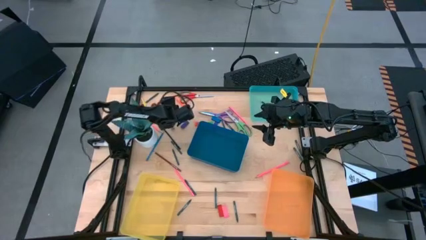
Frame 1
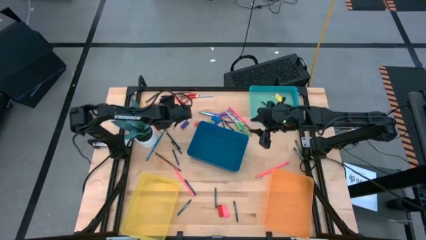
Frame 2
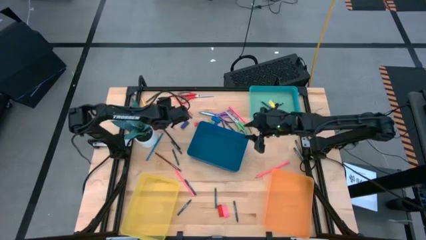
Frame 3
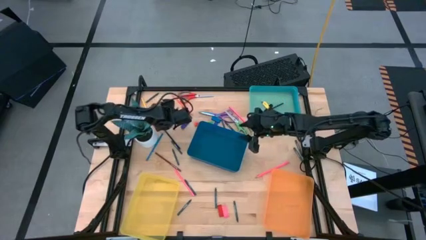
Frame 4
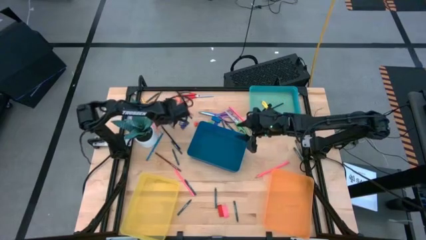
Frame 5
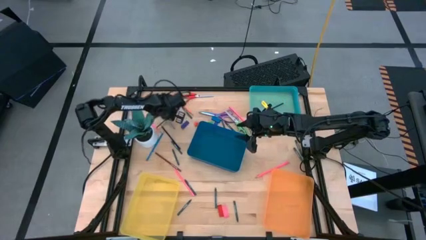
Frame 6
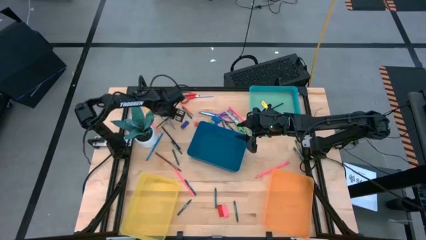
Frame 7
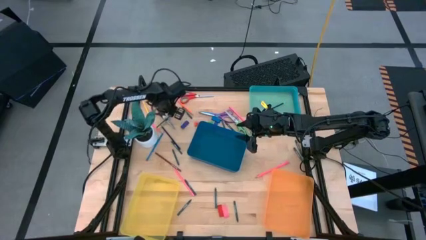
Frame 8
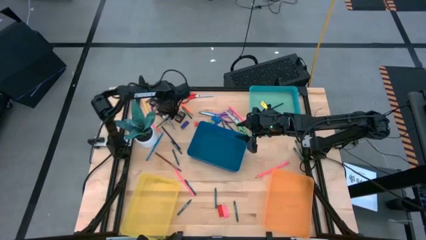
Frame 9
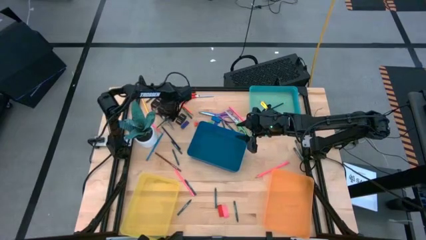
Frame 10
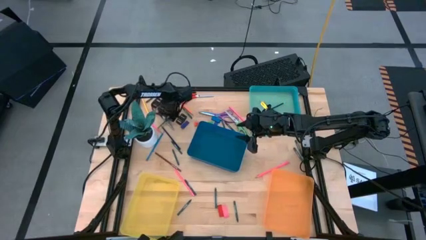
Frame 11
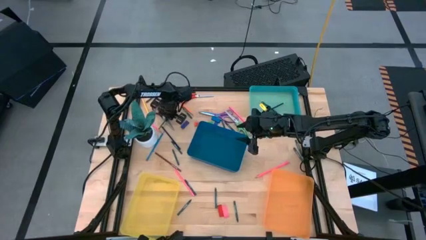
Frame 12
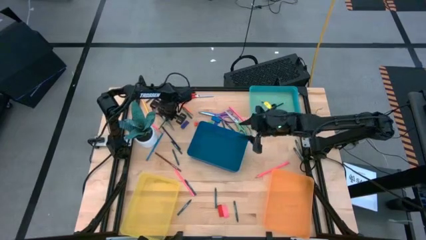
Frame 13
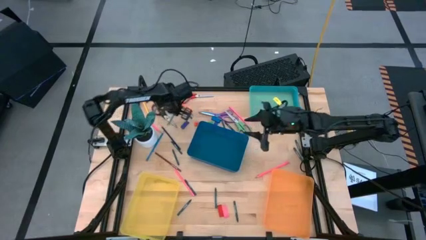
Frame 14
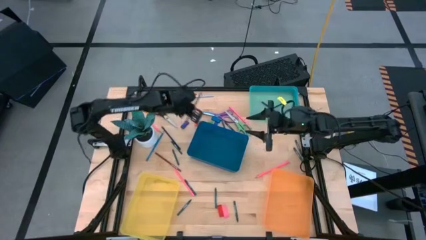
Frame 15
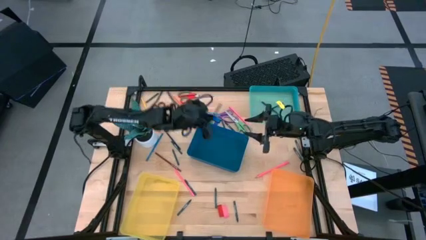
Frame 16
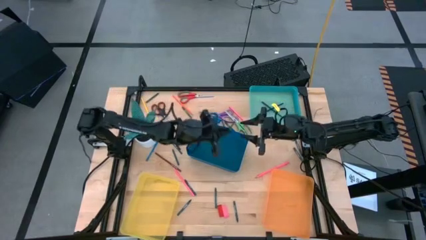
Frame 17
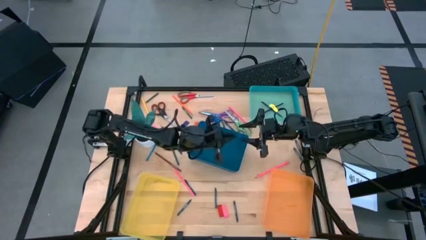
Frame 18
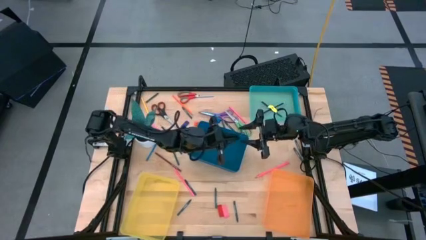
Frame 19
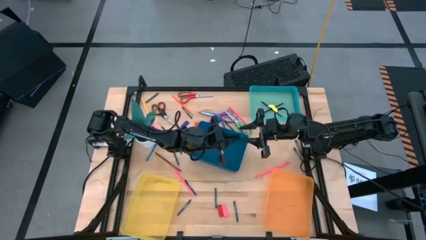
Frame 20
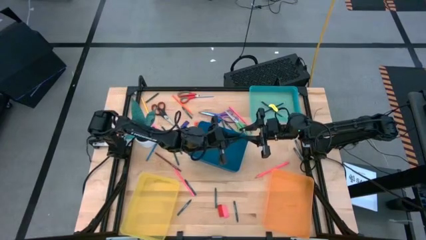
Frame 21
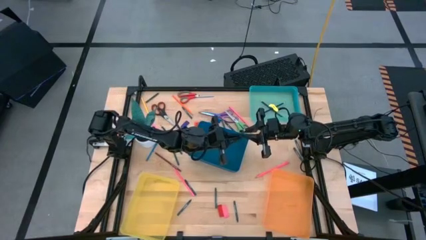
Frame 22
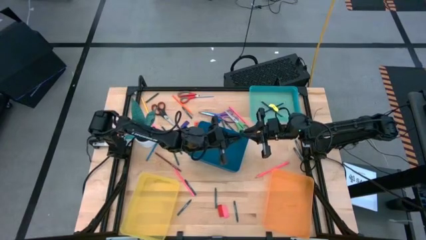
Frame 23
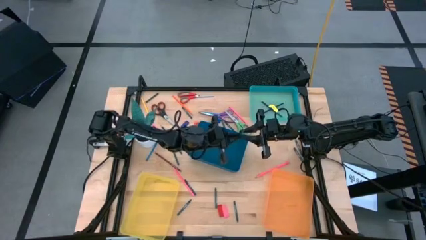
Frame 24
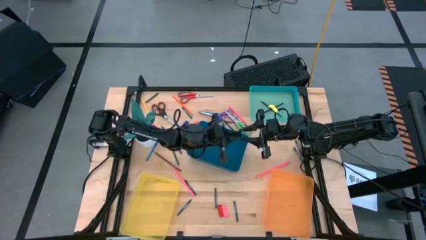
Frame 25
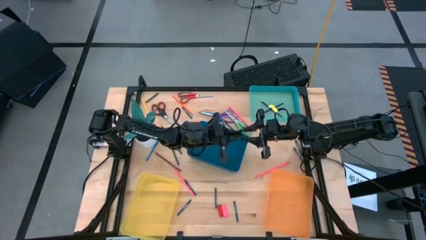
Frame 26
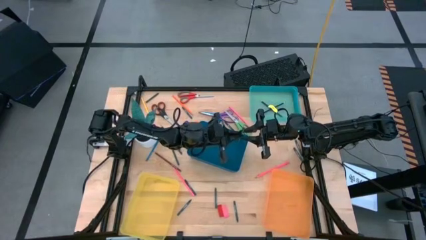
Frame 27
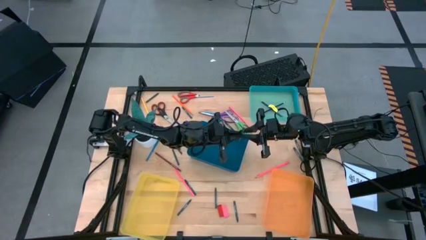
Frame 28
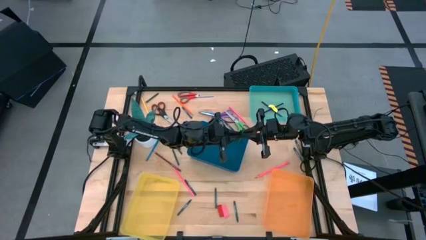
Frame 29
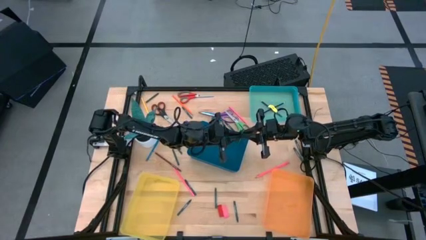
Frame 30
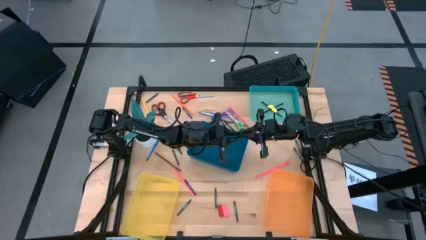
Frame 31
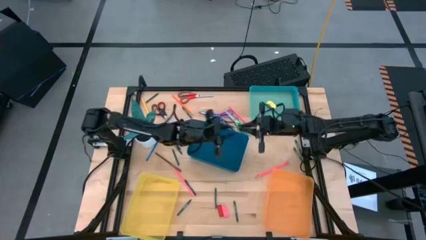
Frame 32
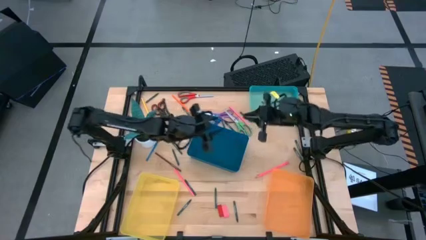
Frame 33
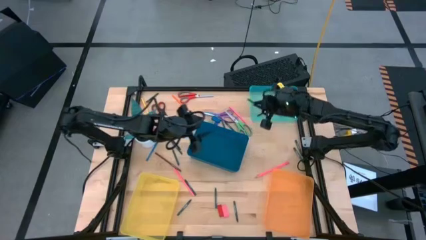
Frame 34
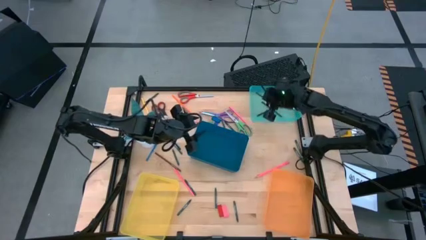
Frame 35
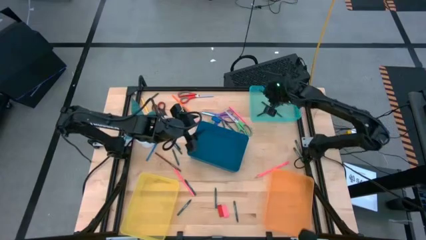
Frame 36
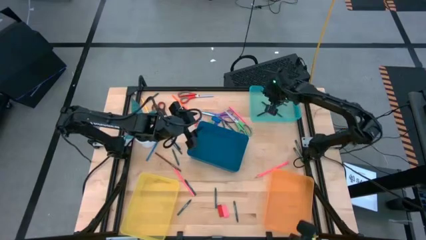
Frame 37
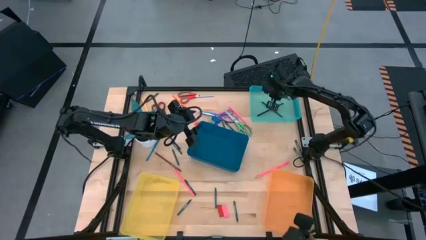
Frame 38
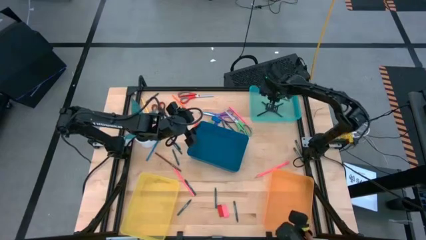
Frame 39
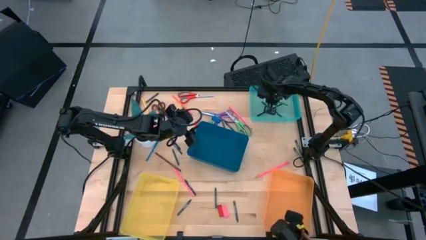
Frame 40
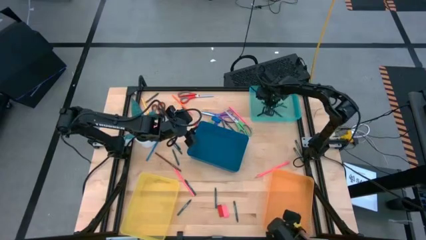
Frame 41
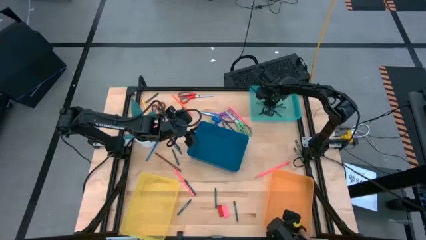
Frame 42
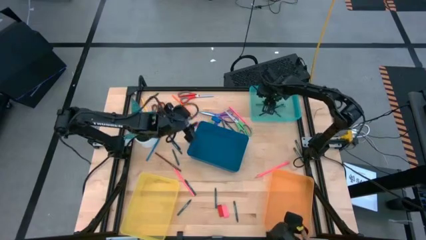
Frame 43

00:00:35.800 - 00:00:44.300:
Task: Sort crayons/erasers/pens/pencils in bins
Put the green pencil into the green bin

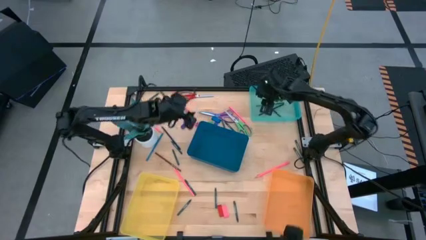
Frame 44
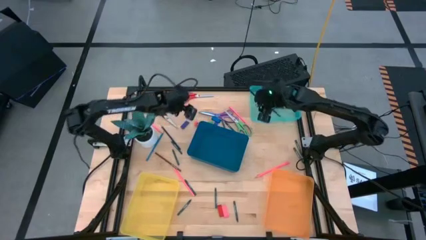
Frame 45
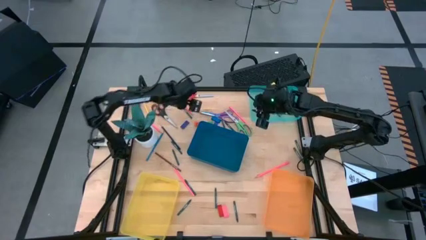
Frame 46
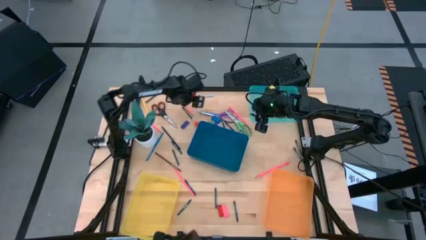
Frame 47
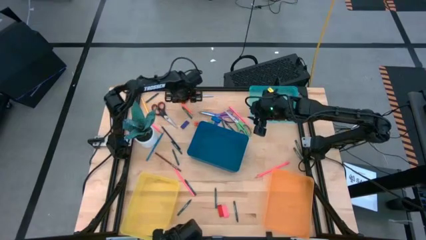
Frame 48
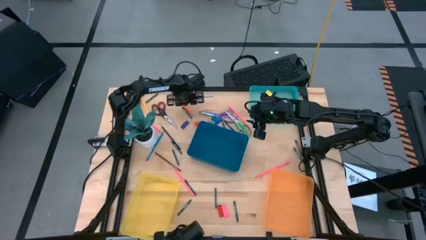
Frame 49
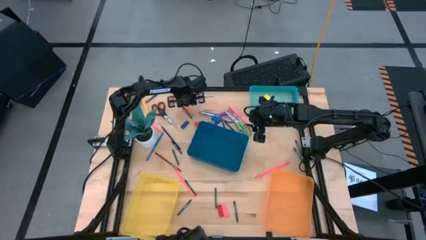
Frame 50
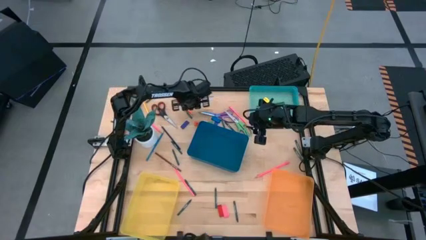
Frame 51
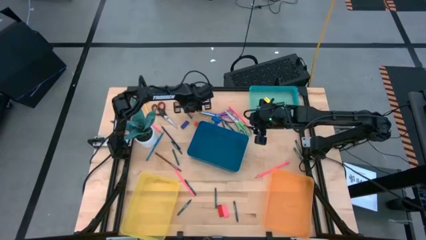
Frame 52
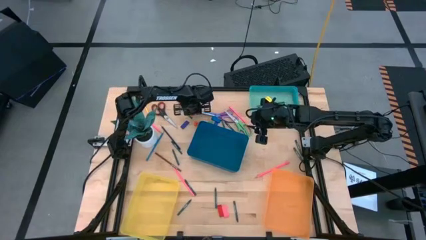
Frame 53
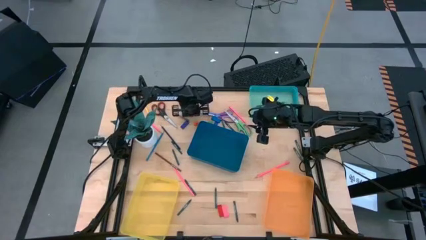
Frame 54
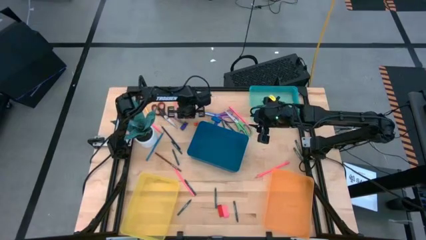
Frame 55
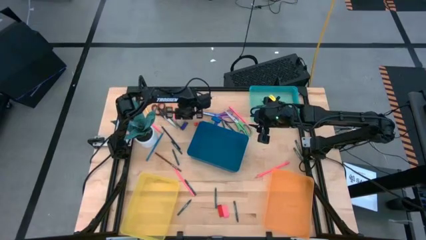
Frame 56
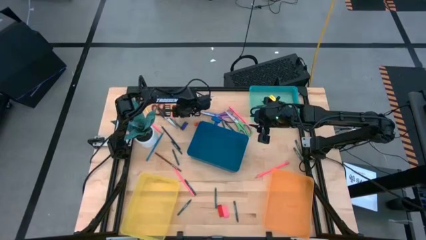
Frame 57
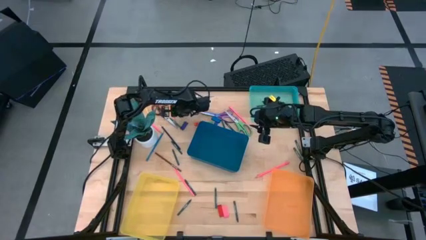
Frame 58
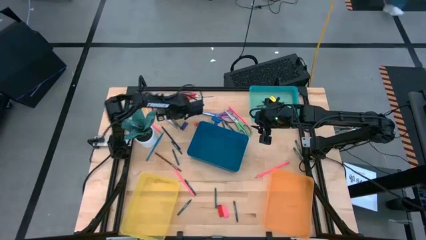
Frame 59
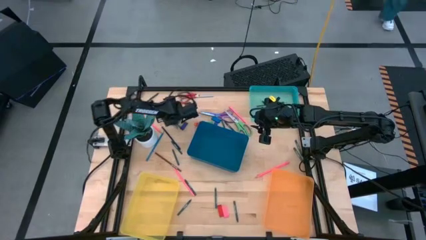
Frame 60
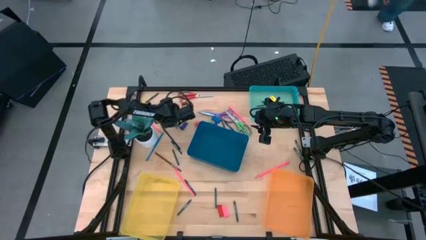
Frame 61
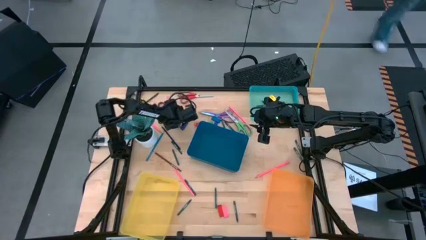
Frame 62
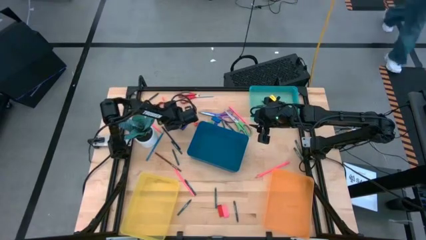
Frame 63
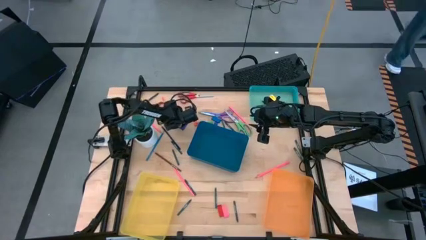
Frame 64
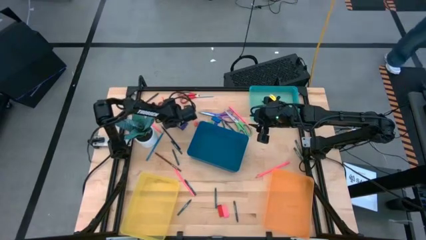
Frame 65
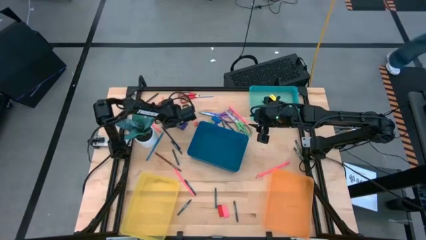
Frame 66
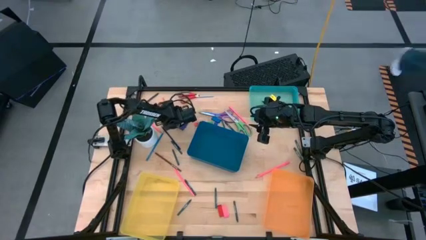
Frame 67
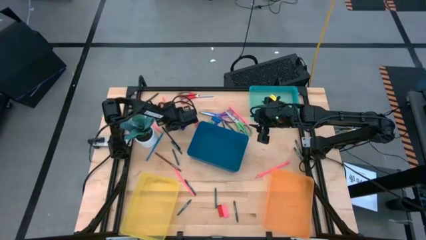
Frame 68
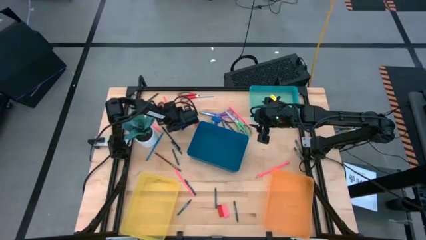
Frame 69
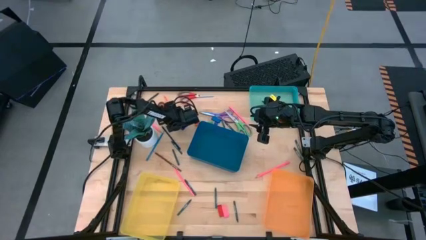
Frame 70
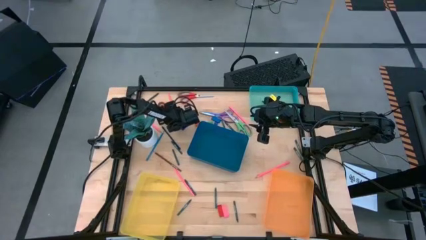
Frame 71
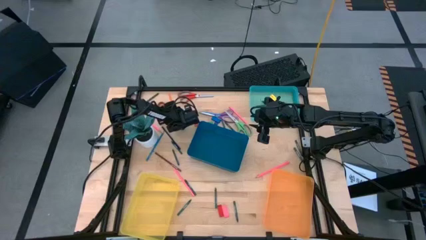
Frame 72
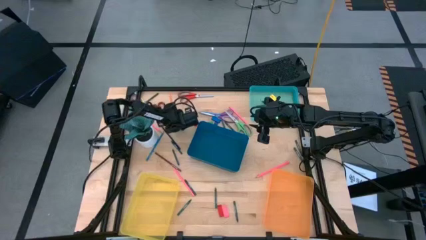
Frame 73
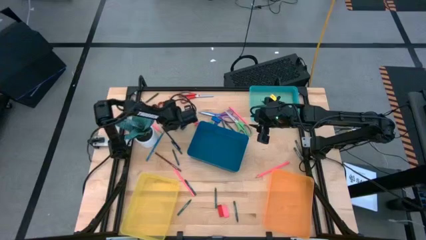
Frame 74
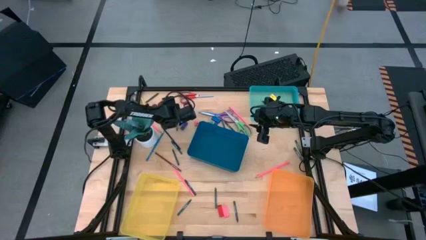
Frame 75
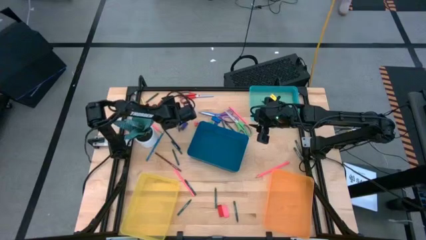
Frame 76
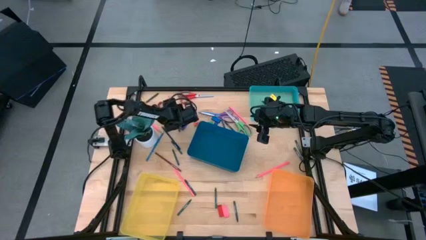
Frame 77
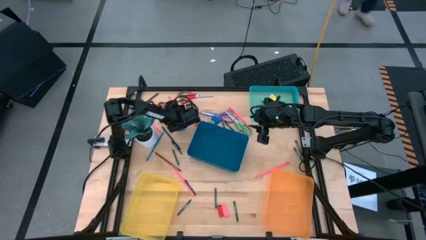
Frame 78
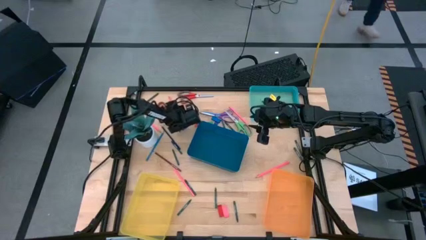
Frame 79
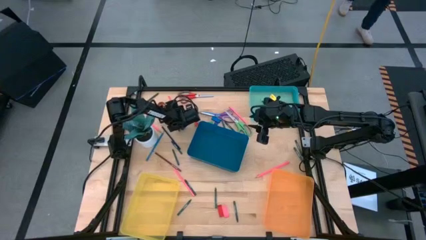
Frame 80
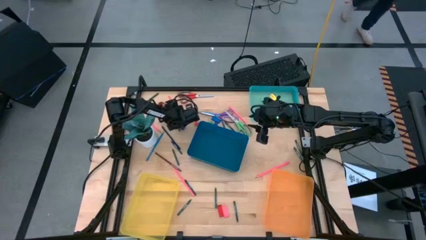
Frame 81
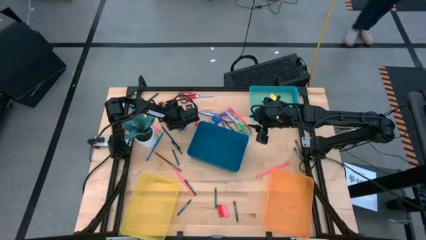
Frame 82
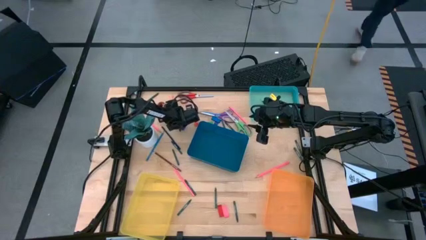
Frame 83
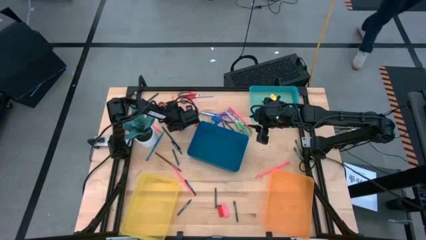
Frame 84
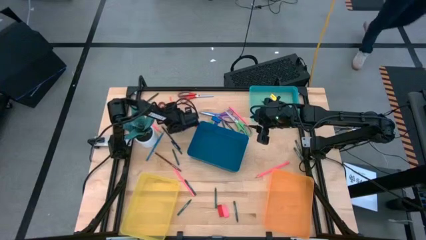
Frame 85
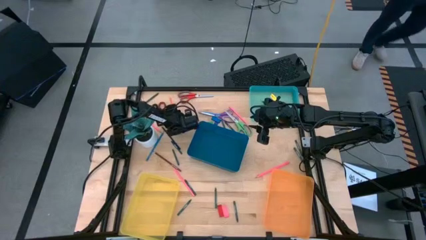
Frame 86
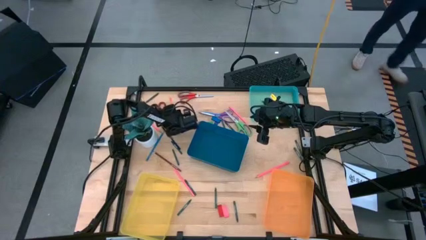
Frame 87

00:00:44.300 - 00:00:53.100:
Put the orange pencil into the green bin
